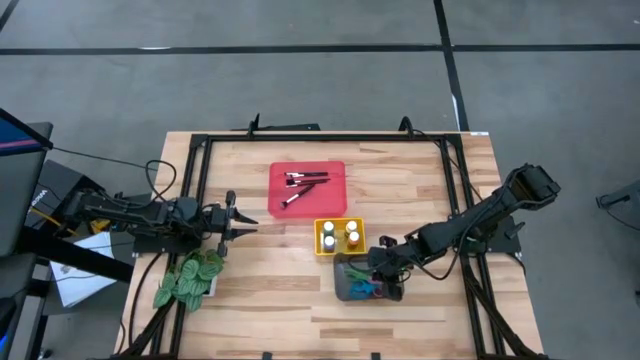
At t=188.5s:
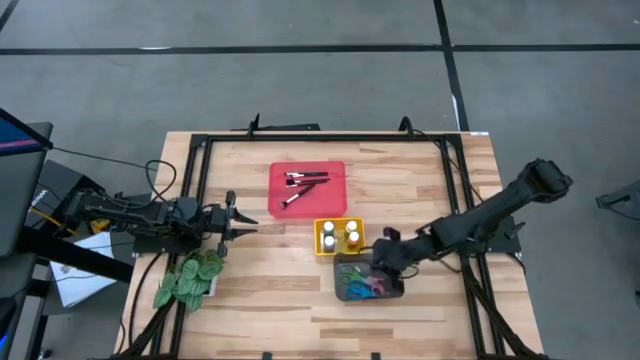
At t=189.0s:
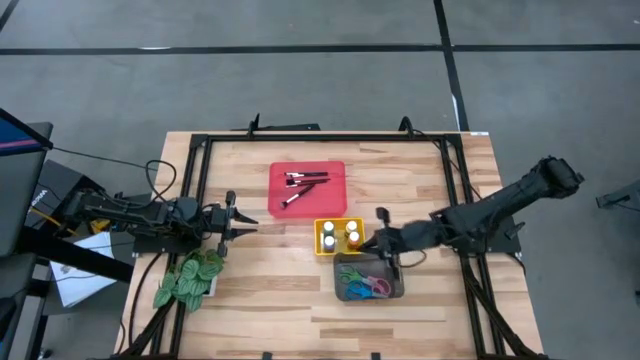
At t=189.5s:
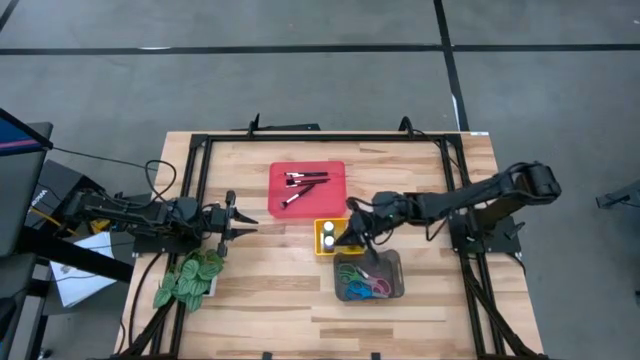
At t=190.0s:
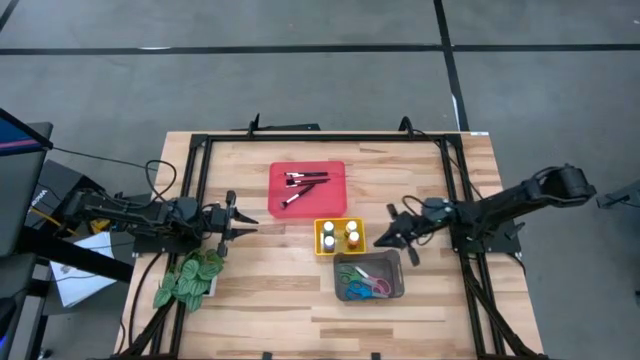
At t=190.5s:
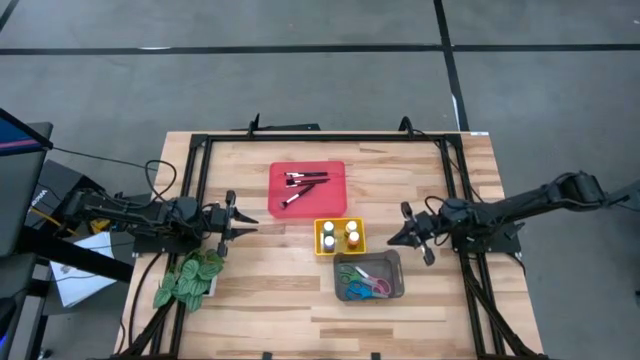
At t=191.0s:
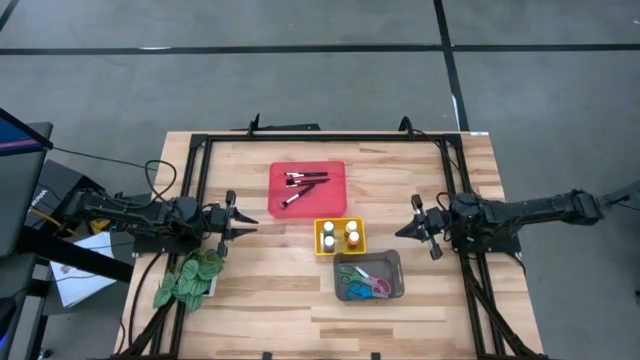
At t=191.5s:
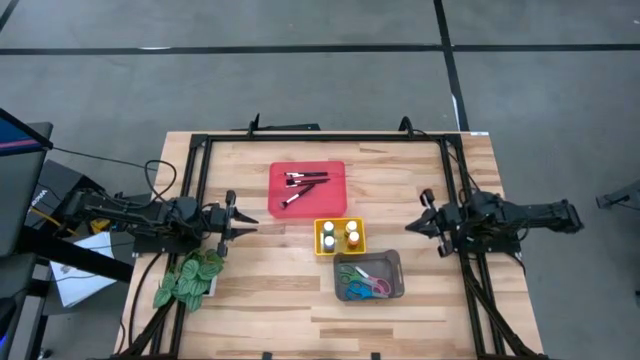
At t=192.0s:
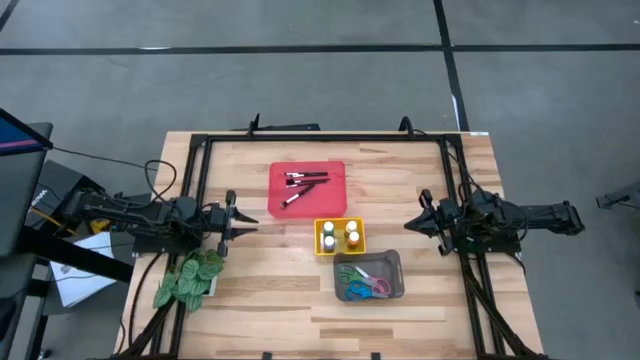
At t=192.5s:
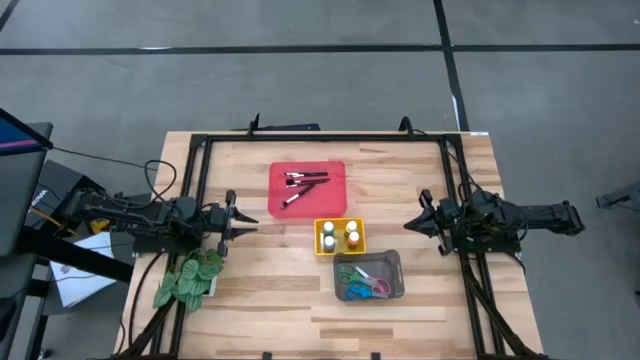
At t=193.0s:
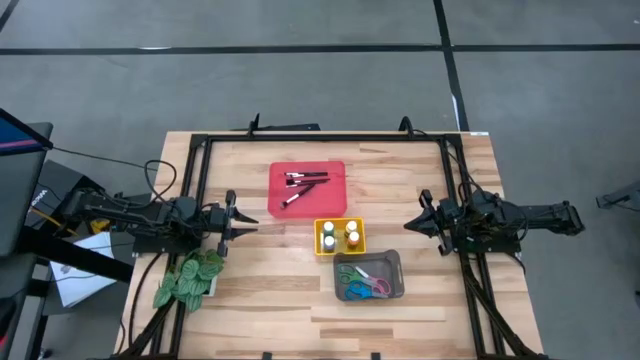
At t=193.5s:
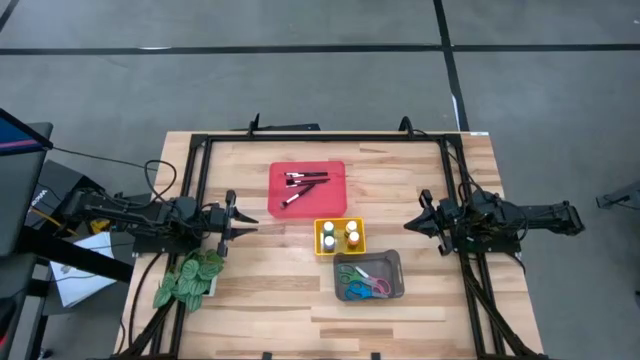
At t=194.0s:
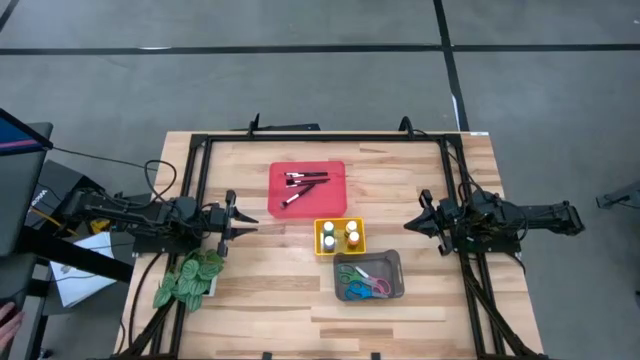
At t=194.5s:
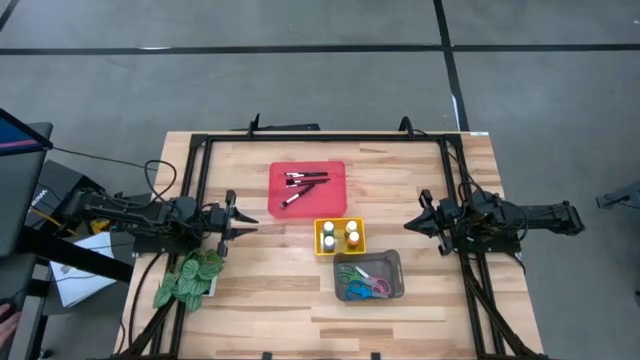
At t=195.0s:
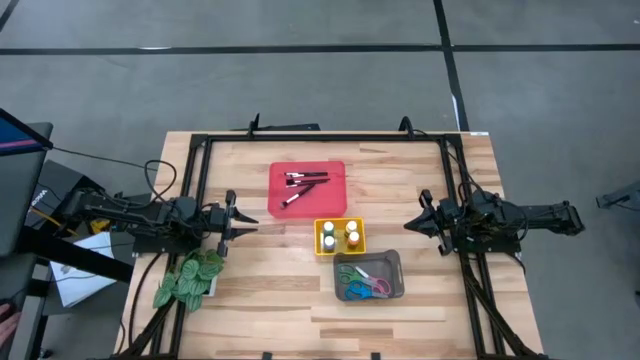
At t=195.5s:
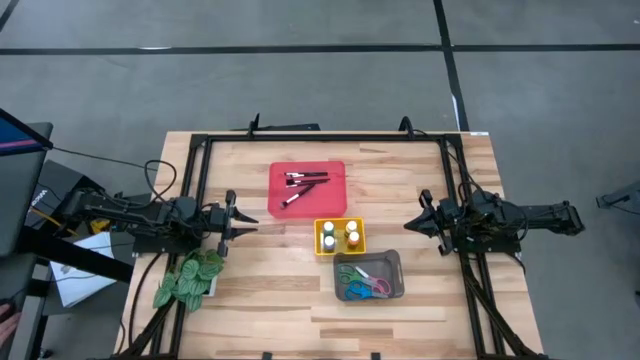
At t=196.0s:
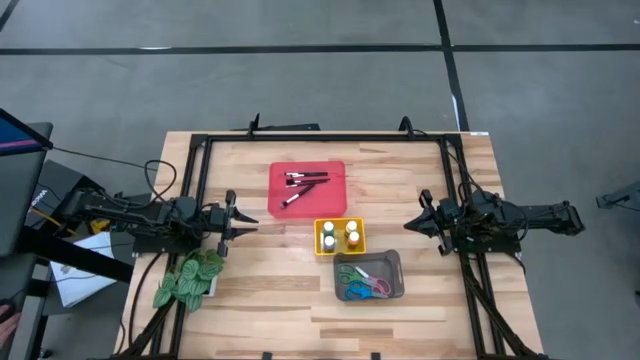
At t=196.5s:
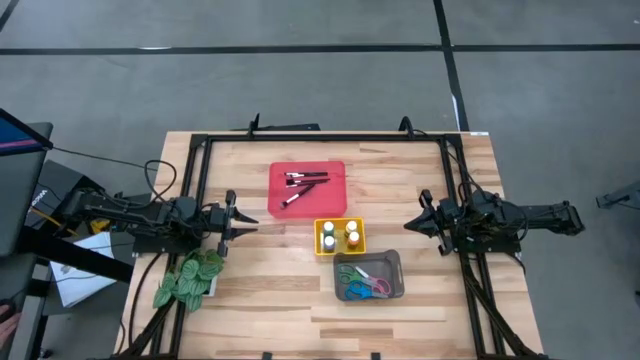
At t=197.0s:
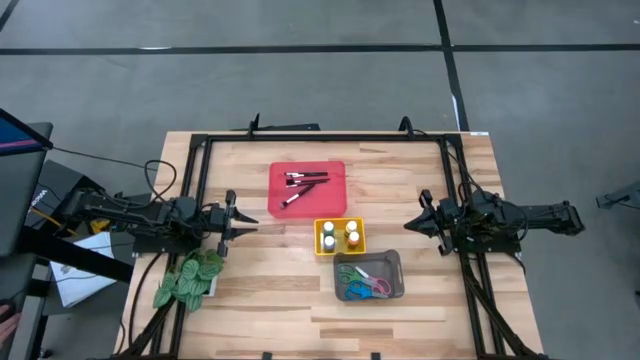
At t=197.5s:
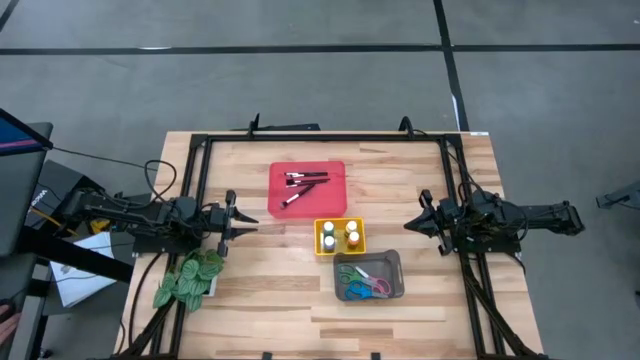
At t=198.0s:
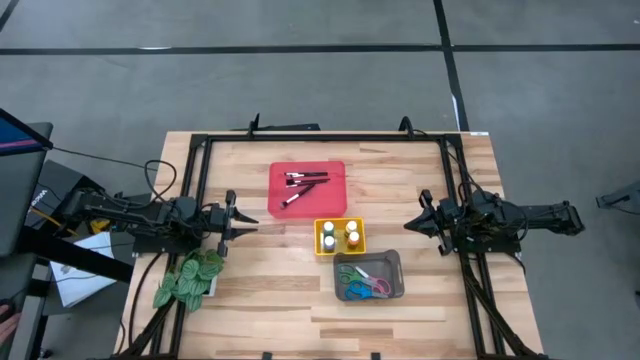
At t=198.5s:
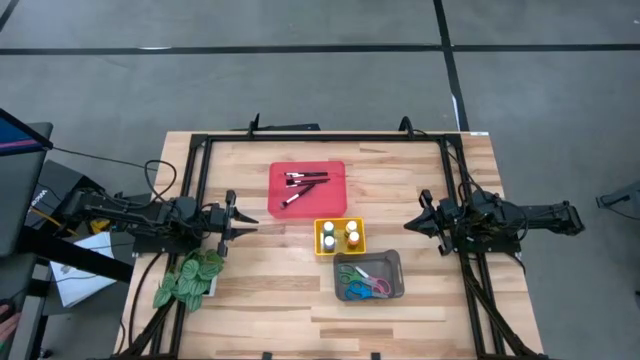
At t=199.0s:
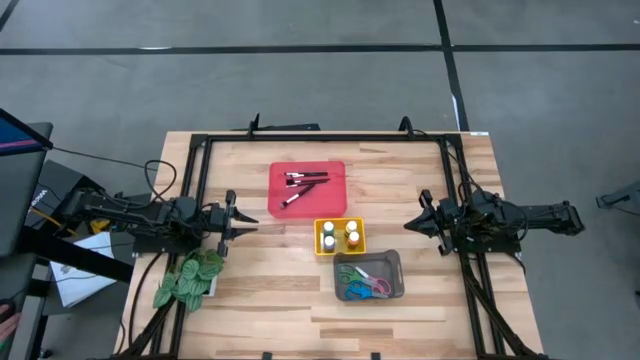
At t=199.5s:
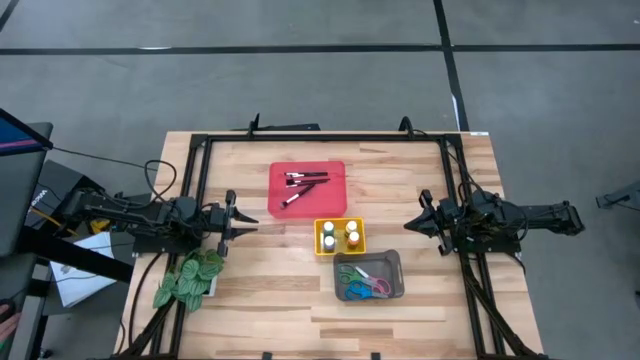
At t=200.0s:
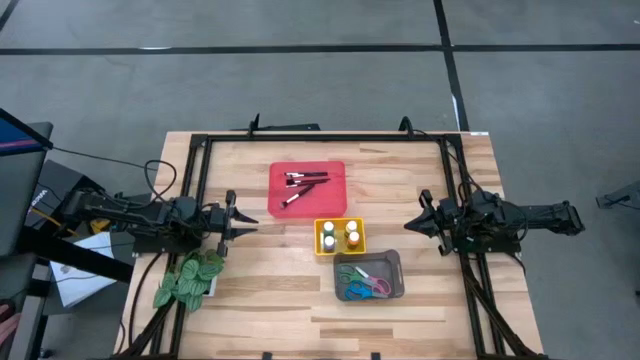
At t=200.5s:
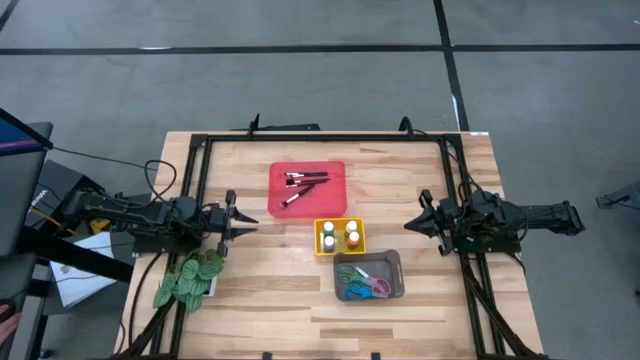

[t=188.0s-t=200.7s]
Task: Pick & Place Paint Supplies
Return to Home Position

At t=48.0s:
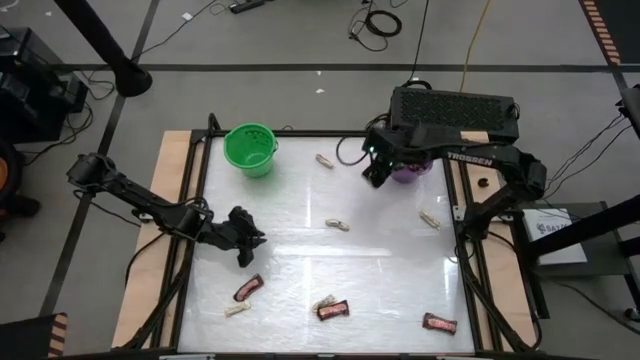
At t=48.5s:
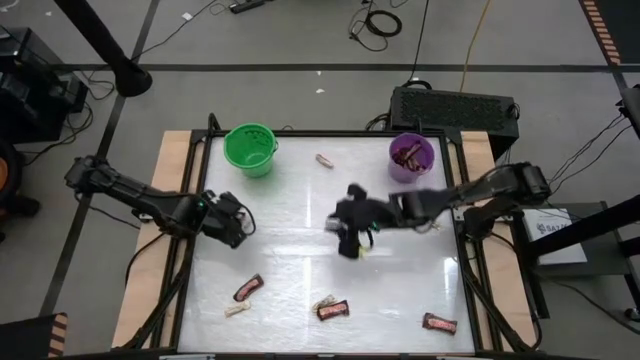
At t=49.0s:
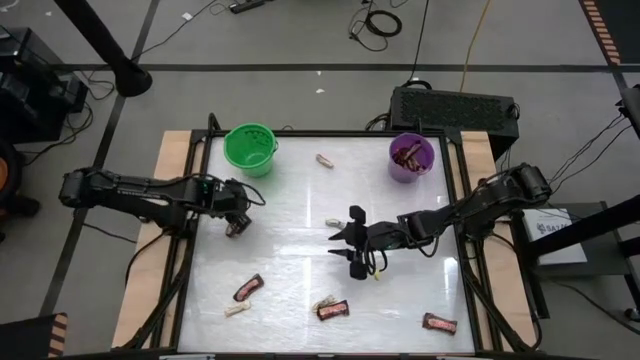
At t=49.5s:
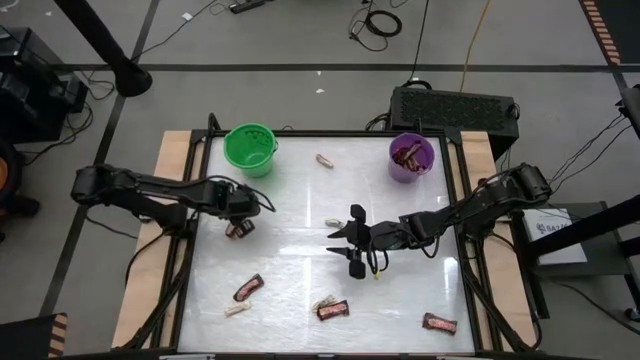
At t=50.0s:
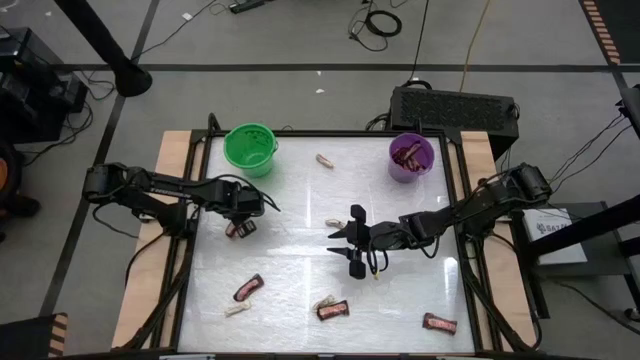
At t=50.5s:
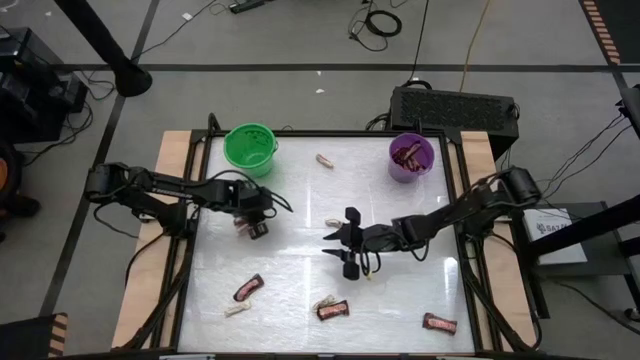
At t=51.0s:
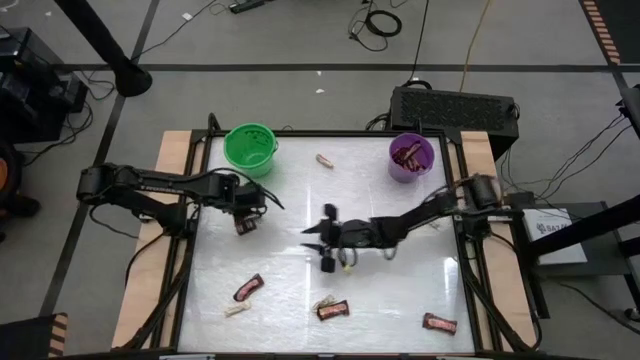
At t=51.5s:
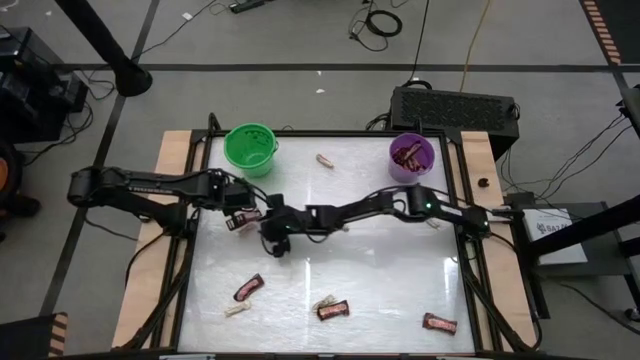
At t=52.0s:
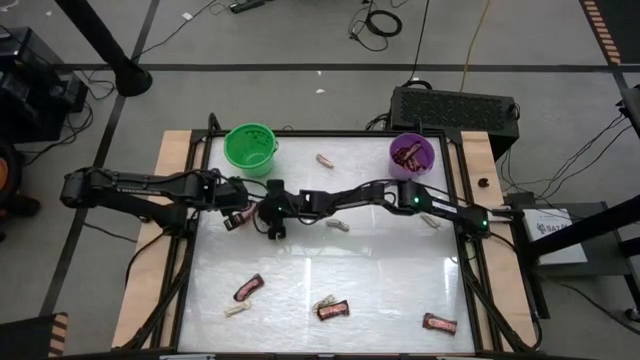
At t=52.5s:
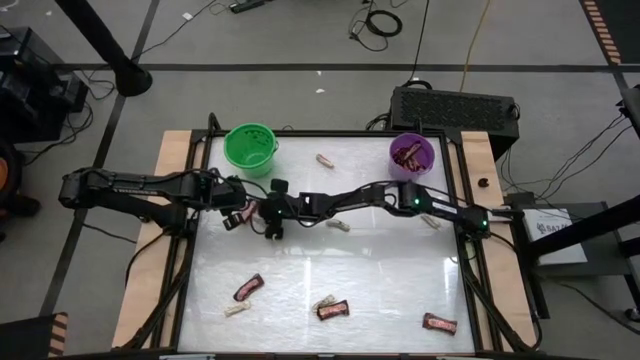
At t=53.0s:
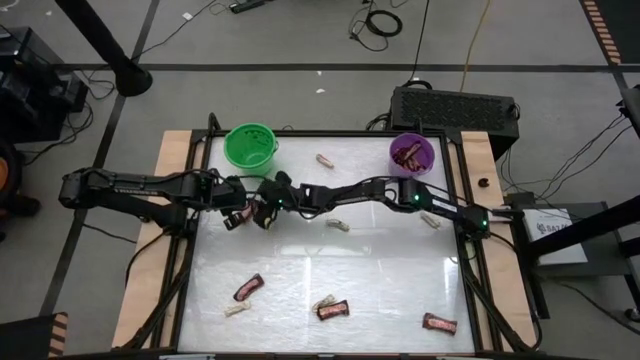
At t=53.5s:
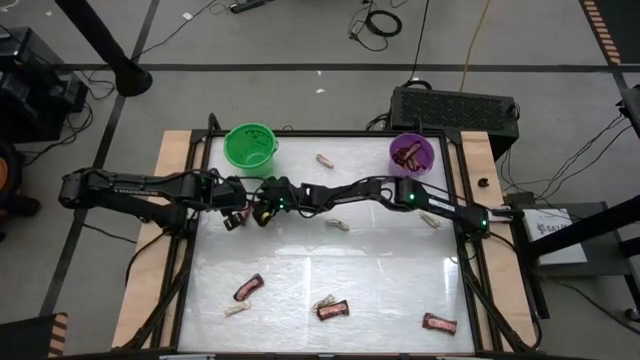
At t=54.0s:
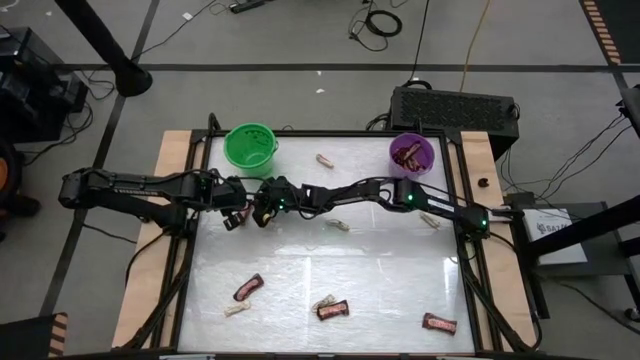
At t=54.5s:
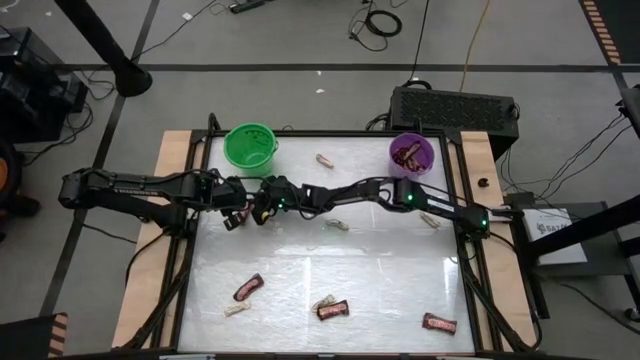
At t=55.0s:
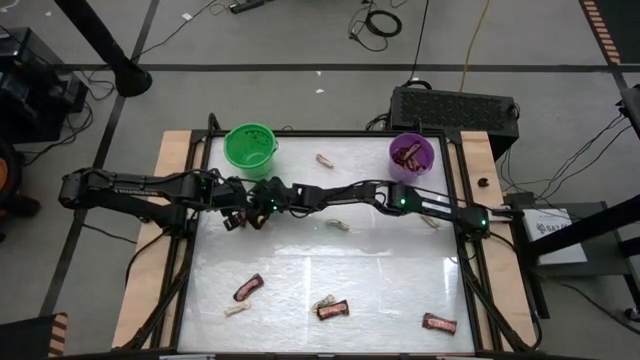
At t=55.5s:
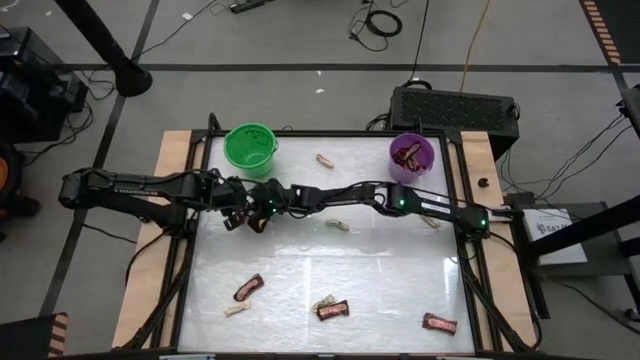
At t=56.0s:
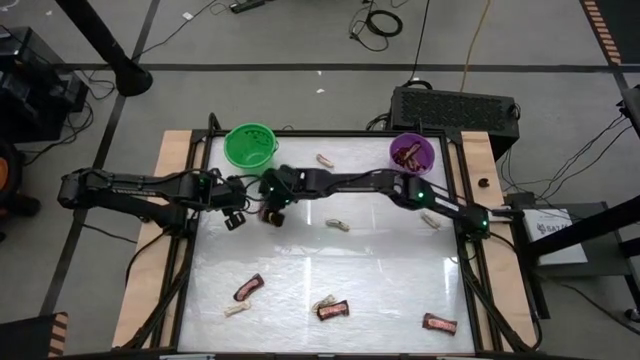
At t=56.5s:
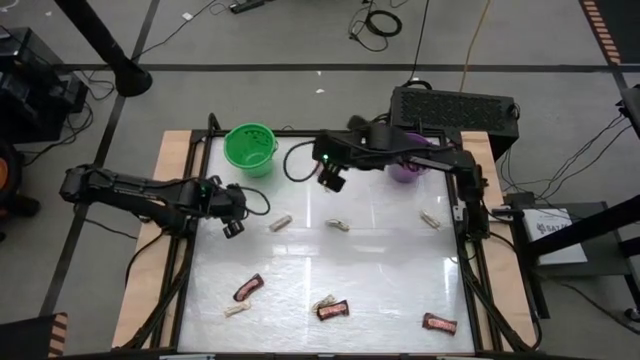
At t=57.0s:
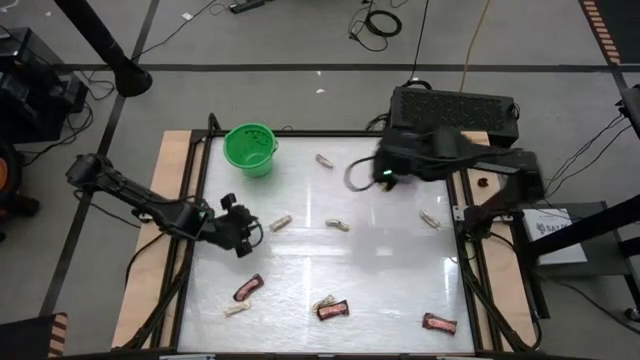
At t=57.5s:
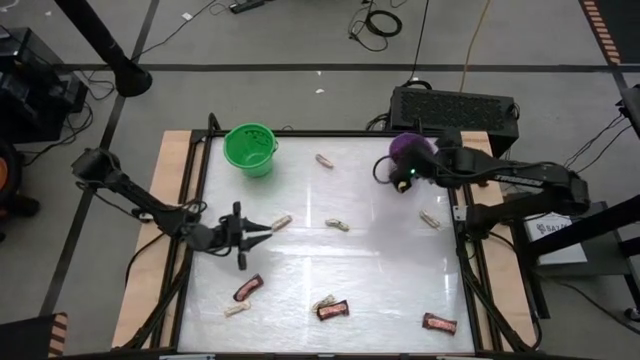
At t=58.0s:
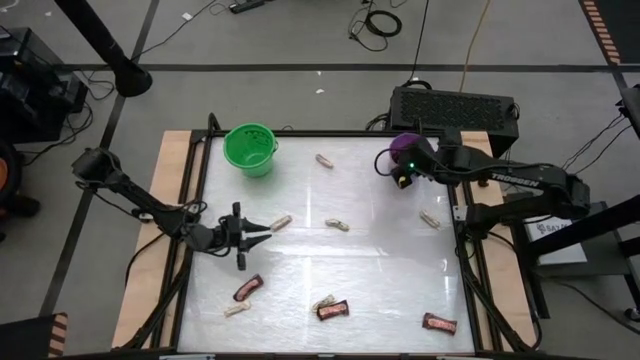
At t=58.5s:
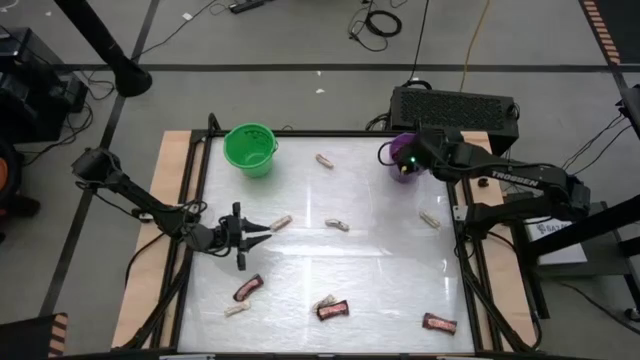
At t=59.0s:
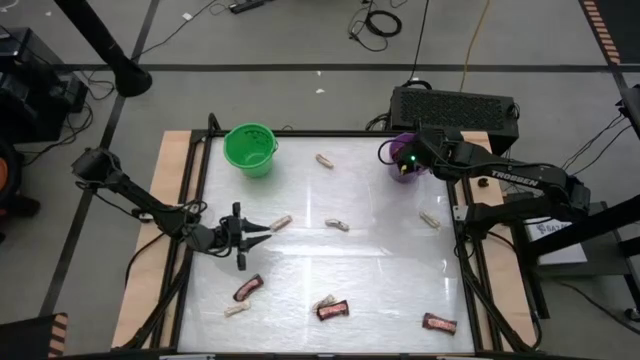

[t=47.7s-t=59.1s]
Task: Sort candy by brand, put in halloween buckets
Put the brown chocolate bar into the purple bucket
